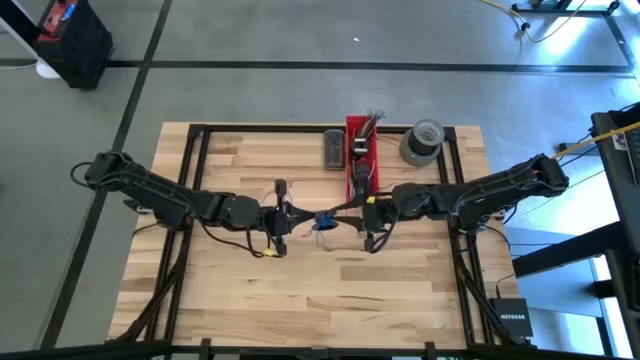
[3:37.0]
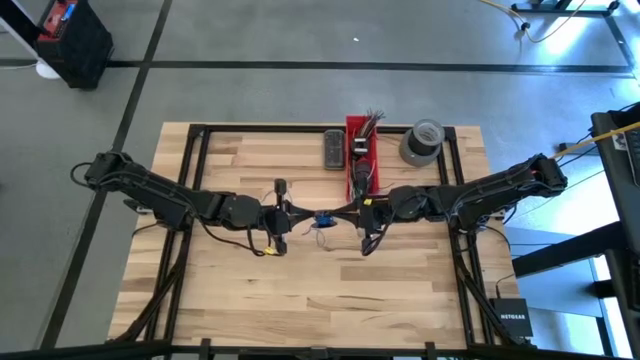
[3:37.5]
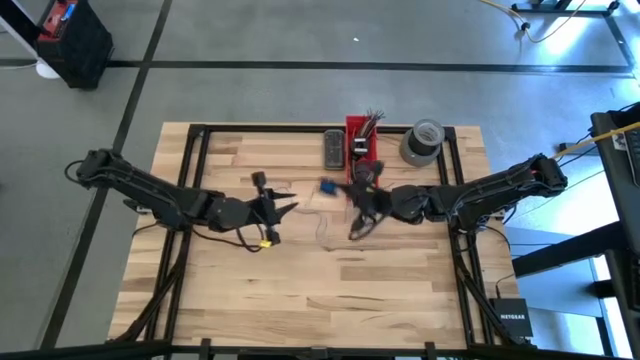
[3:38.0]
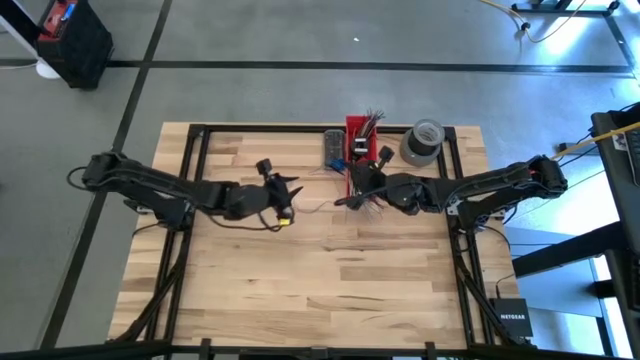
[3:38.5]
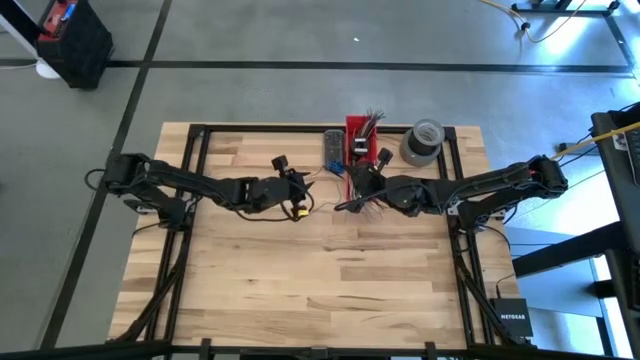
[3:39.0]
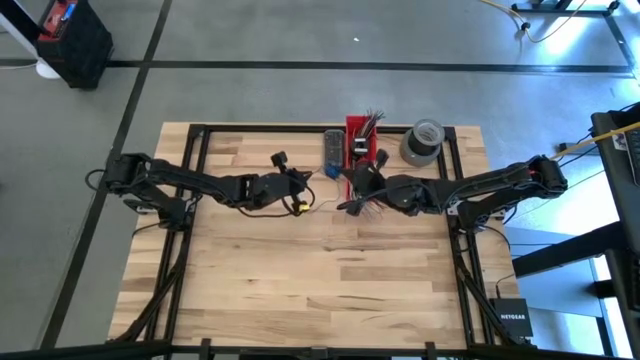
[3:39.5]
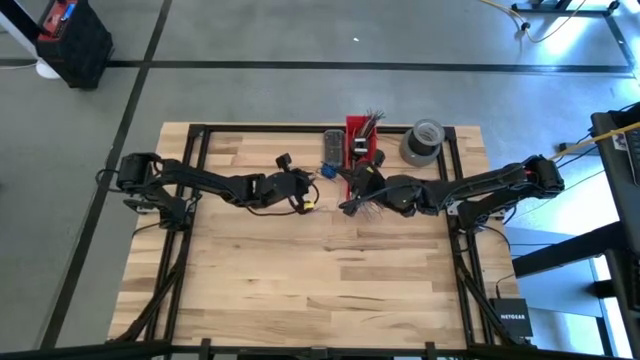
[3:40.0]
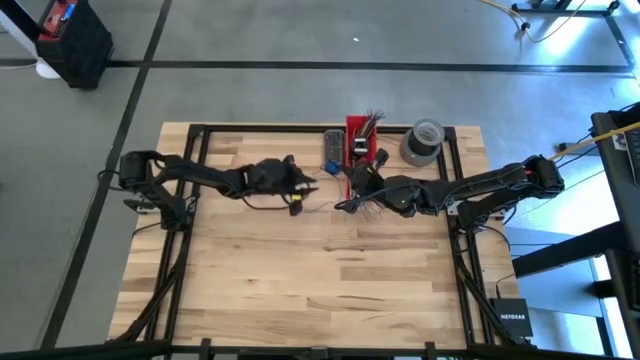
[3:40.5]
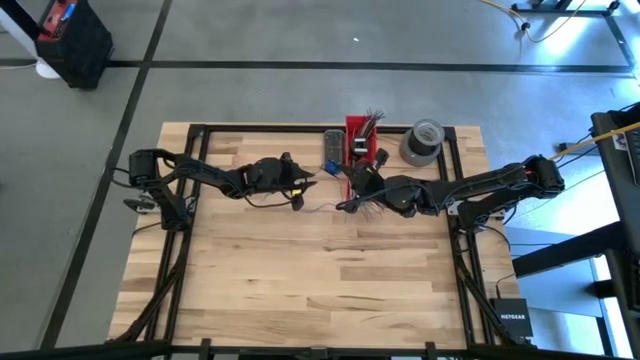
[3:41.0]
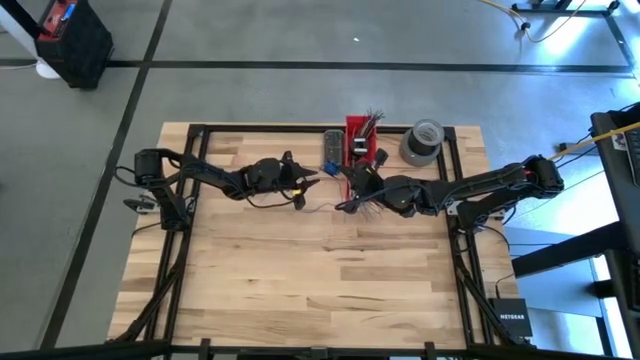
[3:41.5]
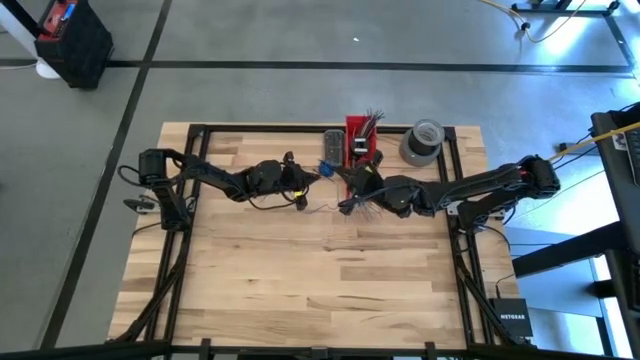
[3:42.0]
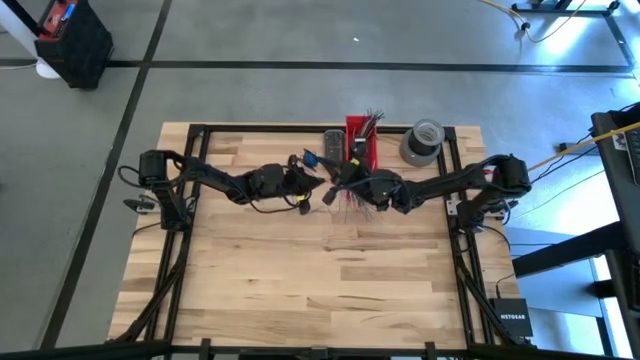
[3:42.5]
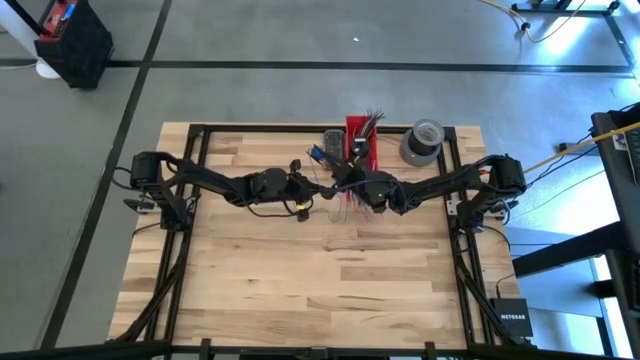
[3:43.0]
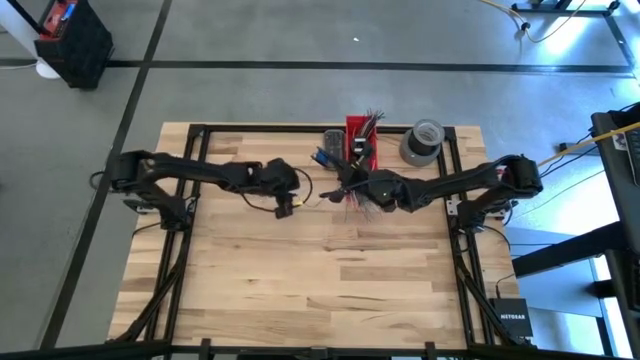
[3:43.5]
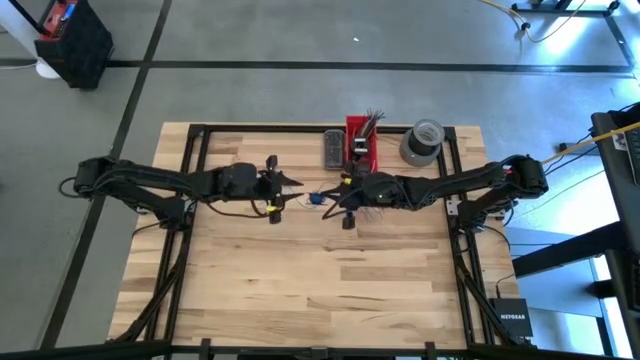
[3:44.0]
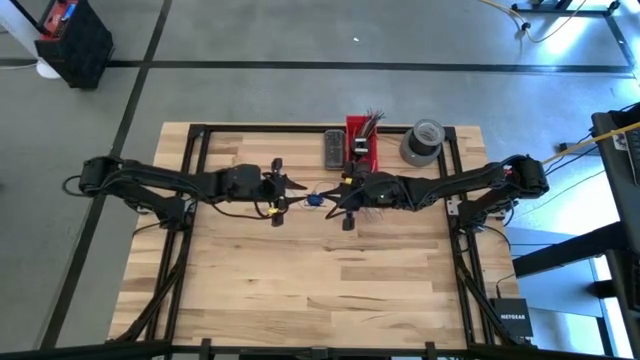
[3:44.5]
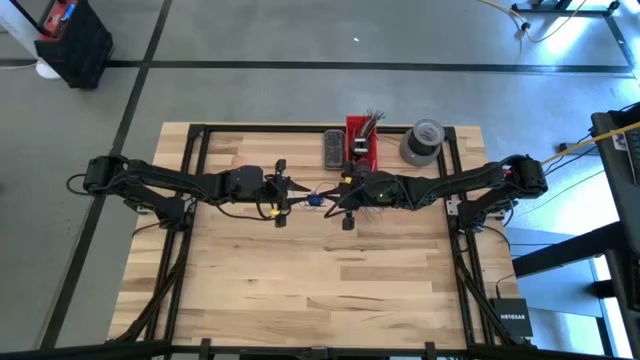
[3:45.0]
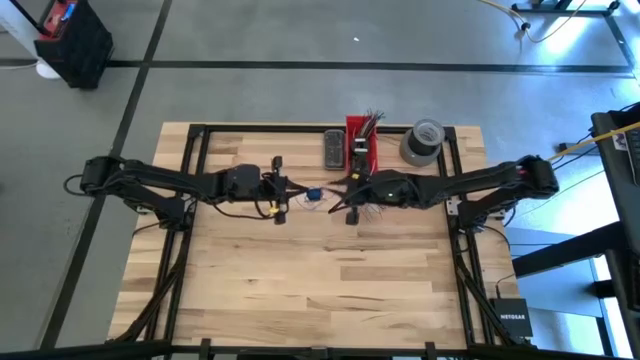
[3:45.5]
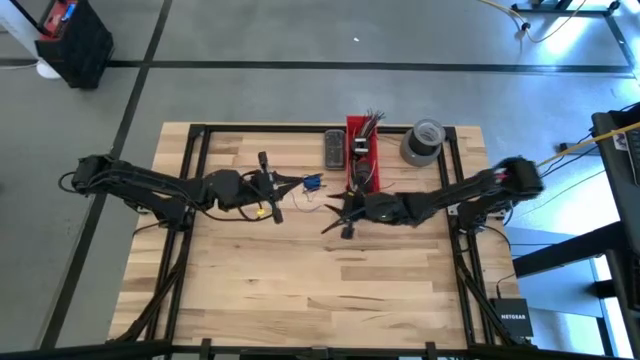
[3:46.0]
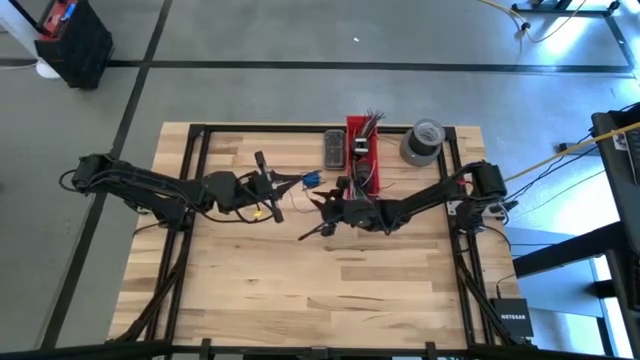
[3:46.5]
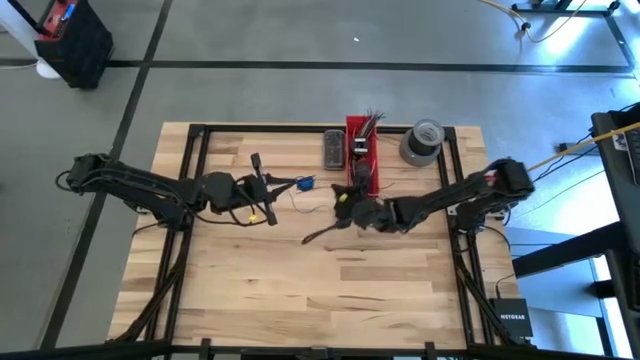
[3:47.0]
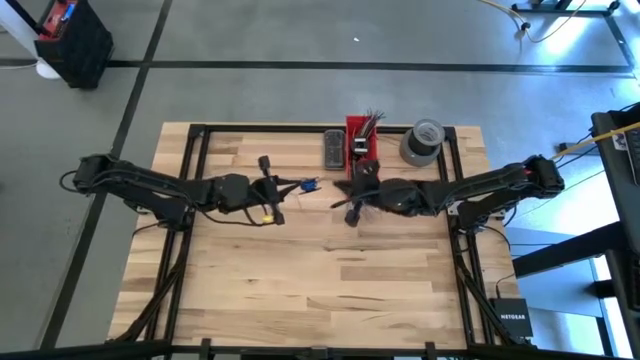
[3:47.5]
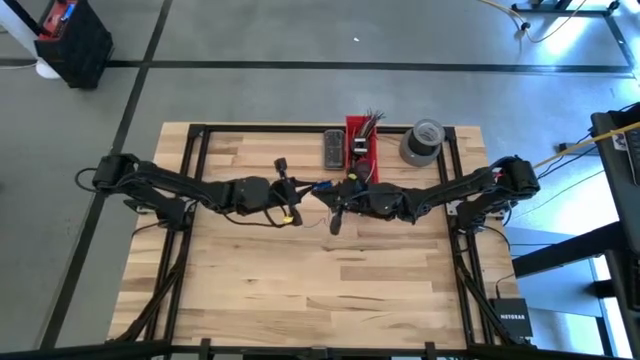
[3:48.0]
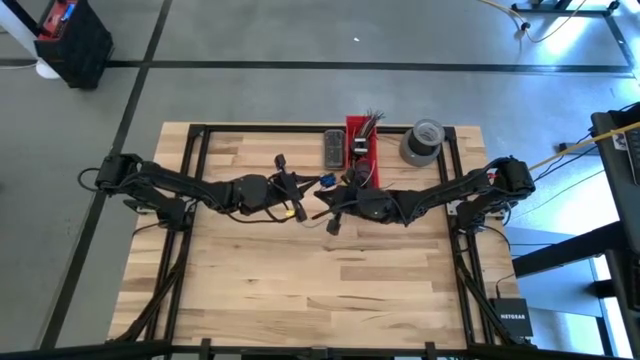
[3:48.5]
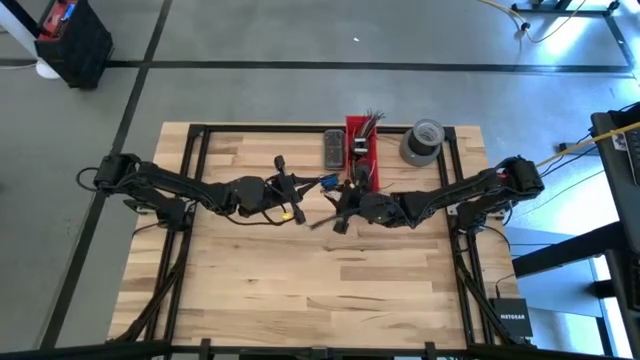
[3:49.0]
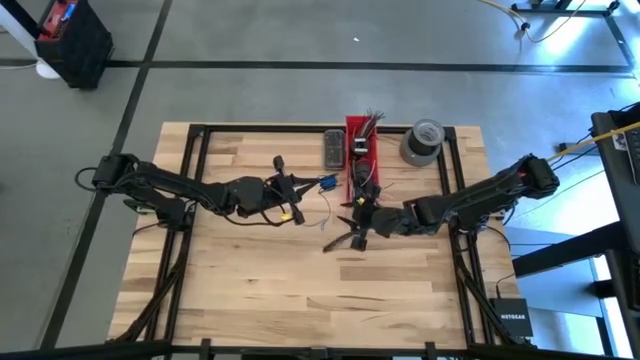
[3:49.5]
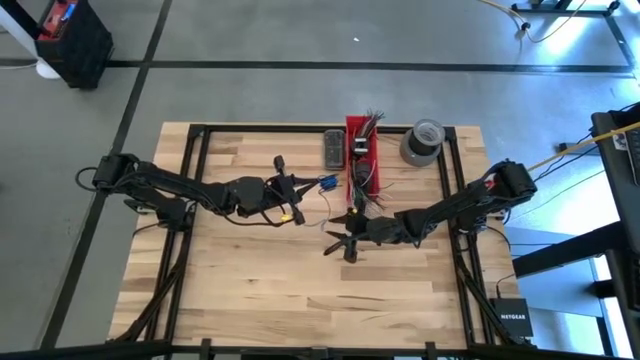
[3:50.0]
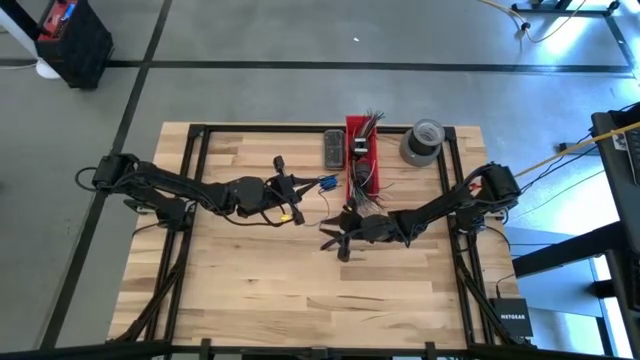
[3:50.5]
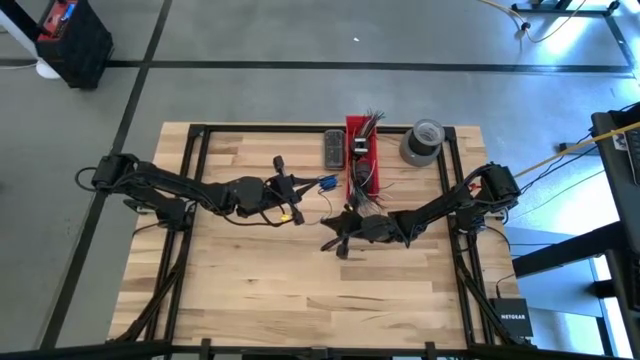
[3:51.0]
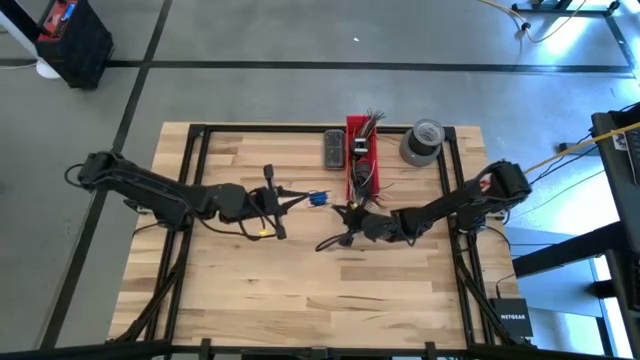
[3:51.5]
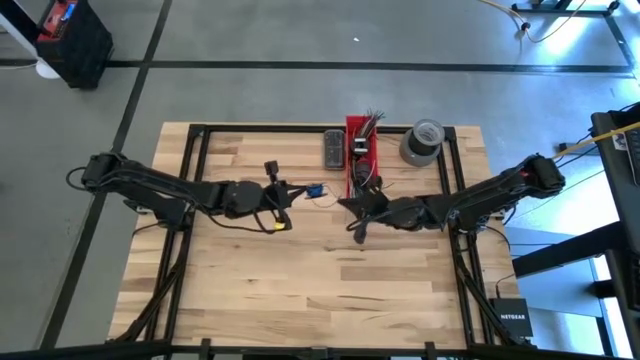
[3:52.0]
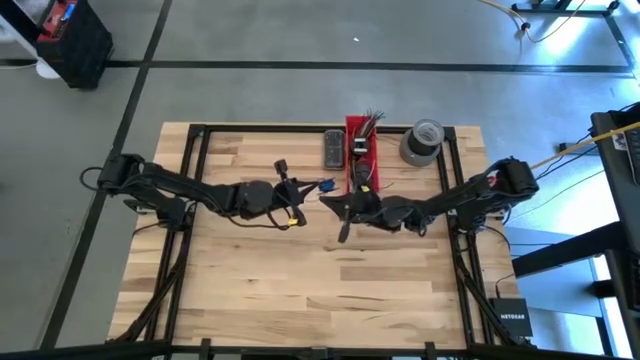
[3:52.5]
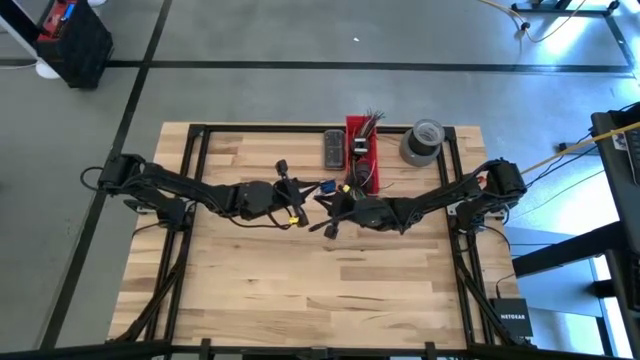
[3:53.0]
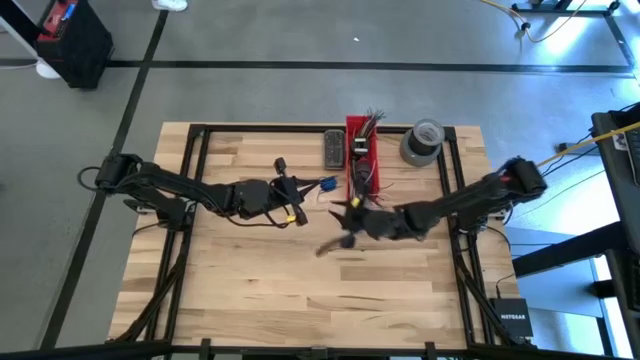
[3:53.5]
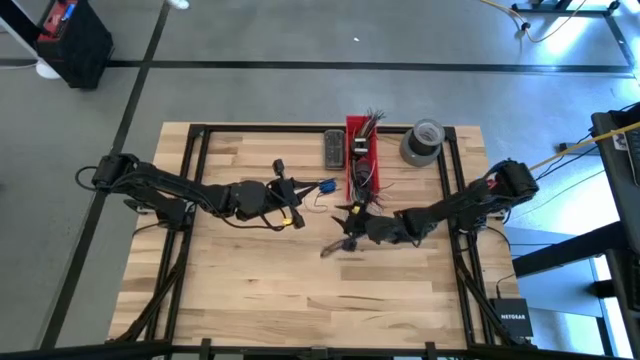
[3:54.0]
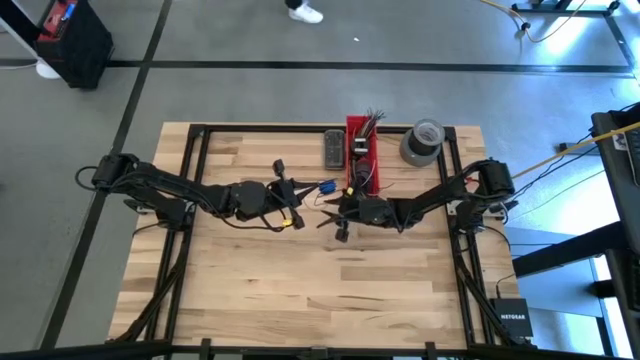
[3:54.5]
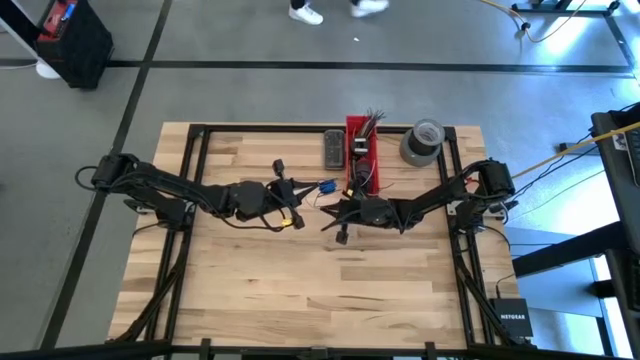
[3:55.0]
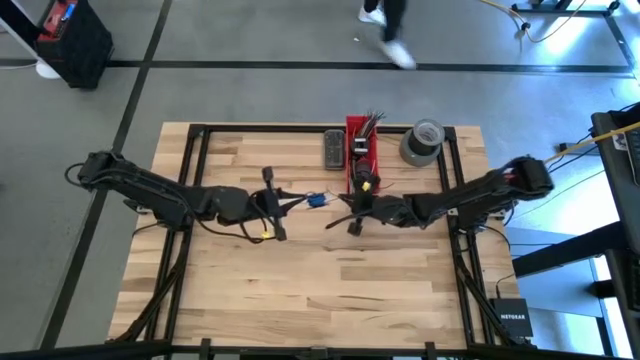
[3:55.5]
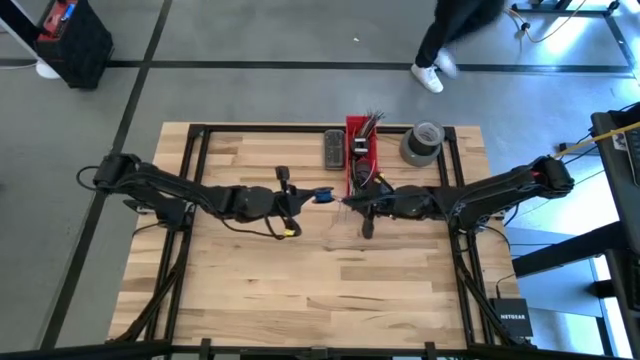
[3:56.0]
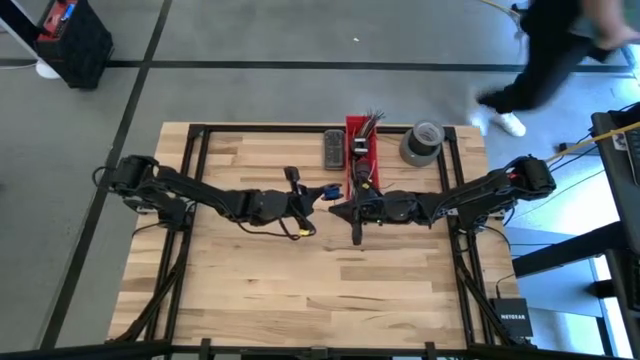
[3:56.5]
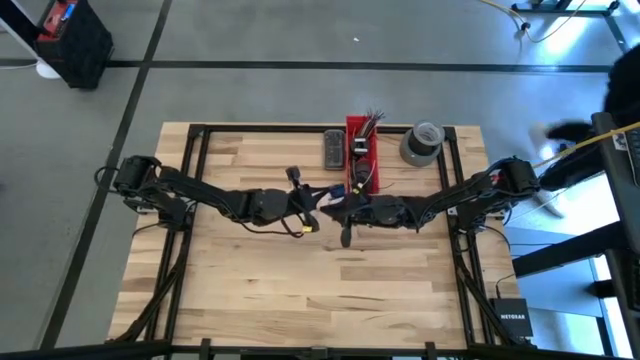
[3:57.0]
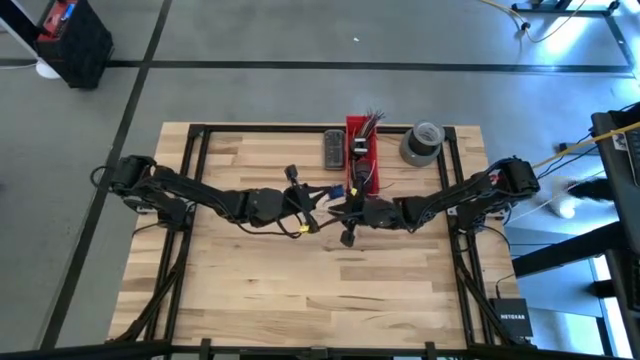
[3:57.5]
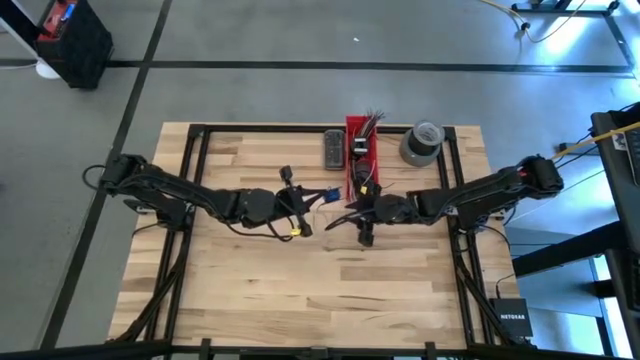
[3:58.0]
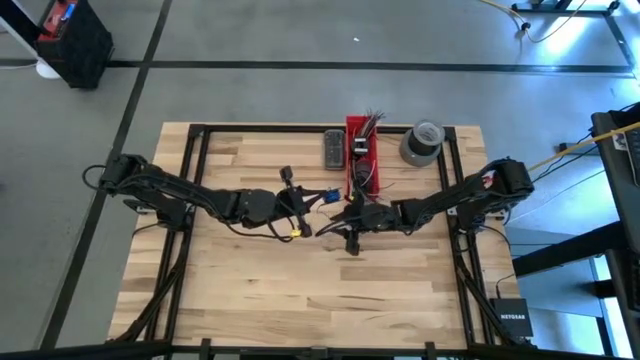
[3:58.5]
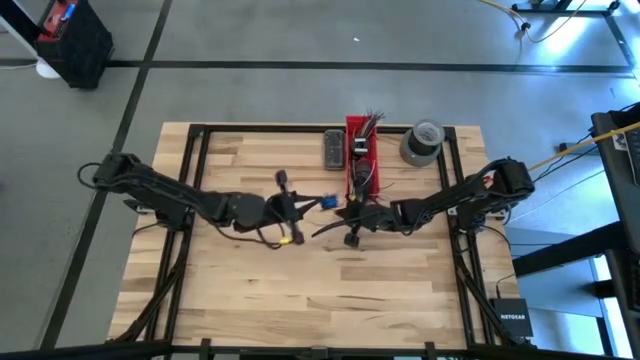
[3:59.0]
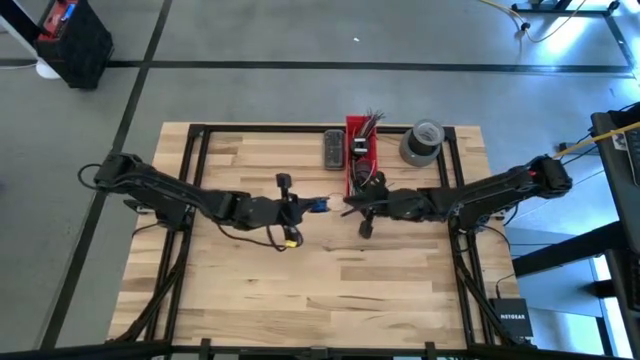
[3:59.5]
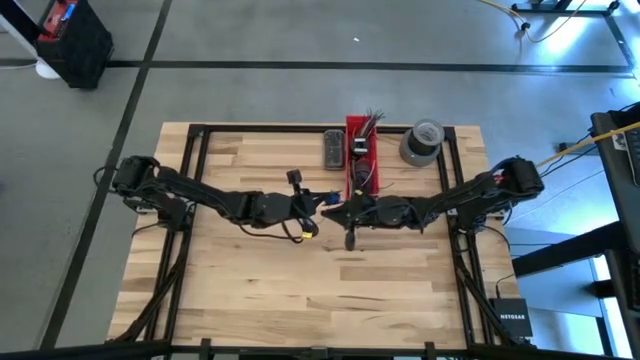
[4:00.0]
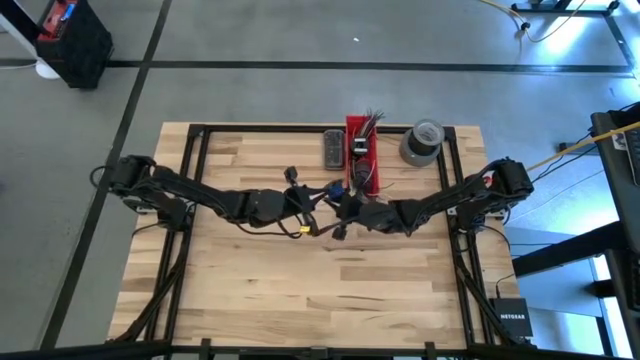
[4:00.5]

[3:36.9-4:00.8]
Task: Coil cords
Coil the blue wire into the black spool
